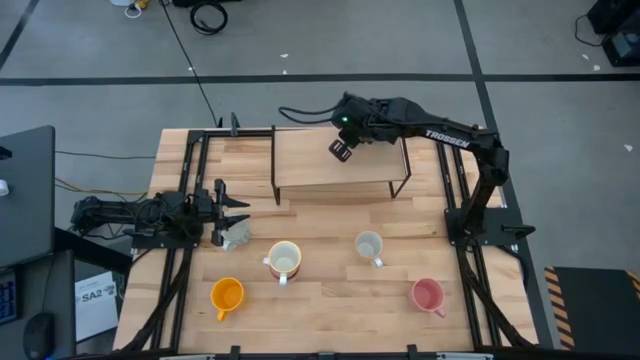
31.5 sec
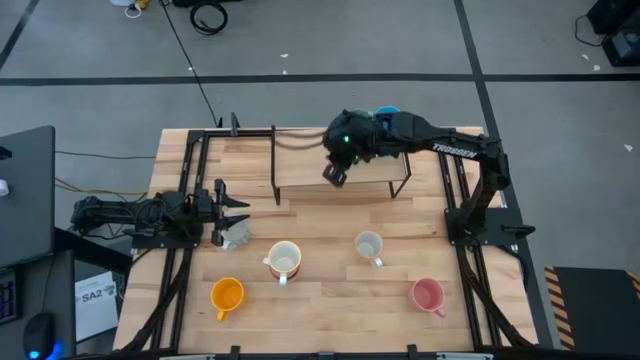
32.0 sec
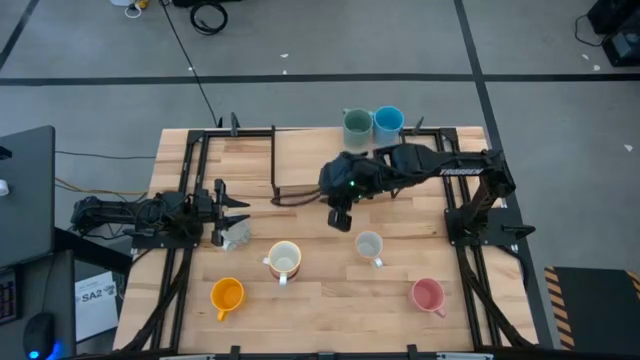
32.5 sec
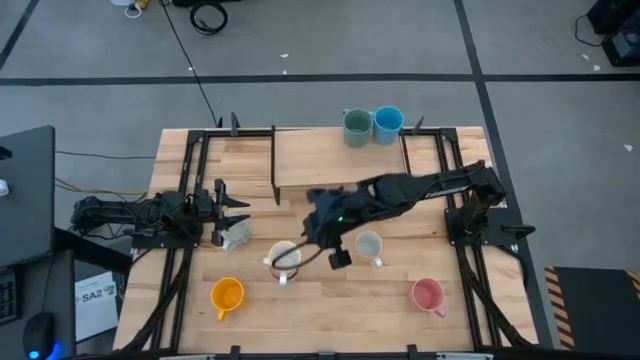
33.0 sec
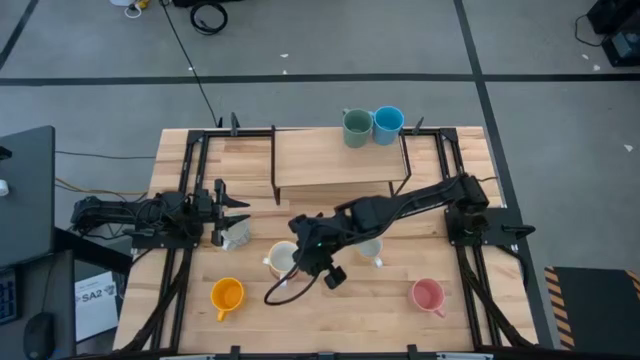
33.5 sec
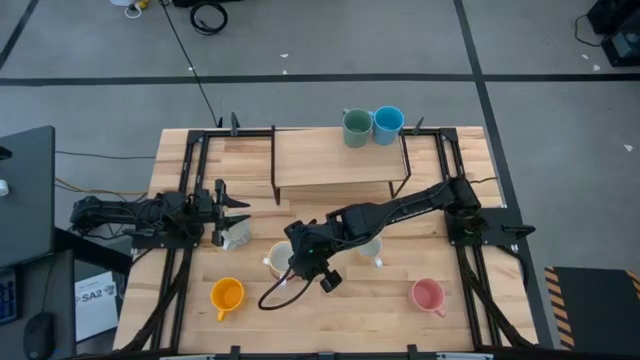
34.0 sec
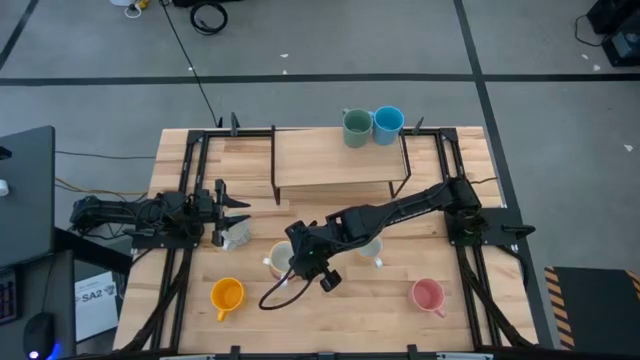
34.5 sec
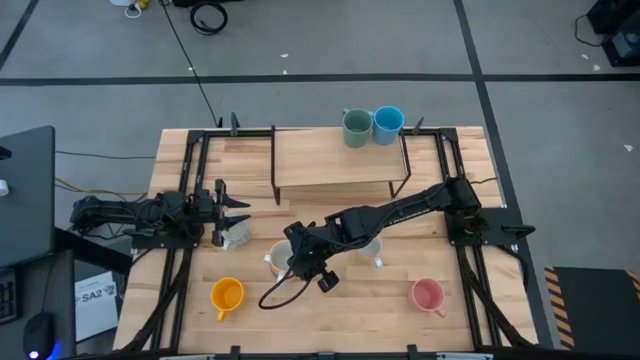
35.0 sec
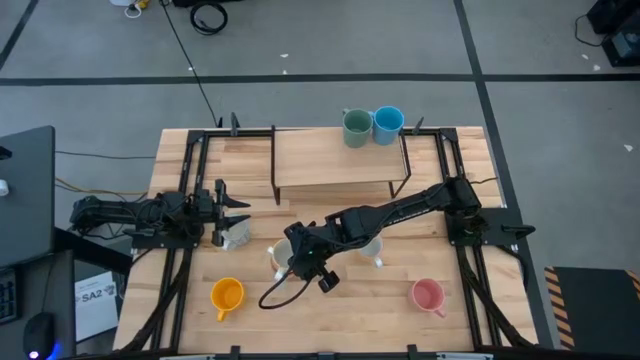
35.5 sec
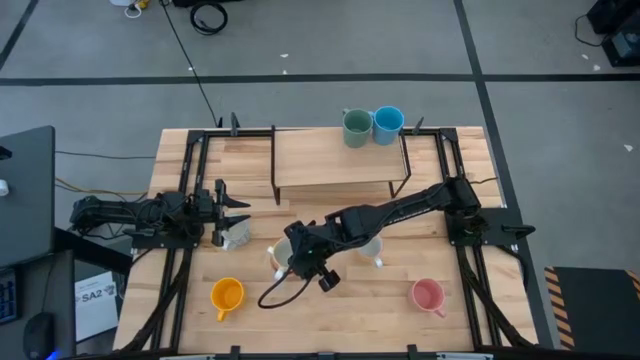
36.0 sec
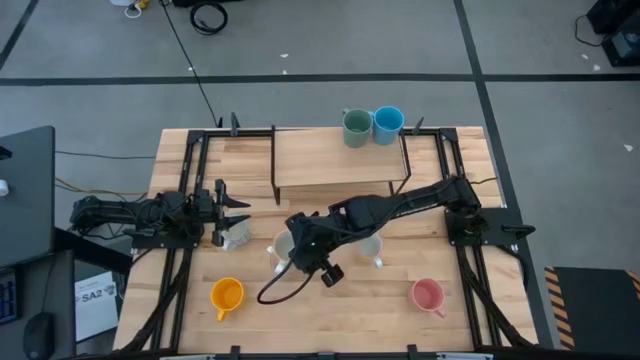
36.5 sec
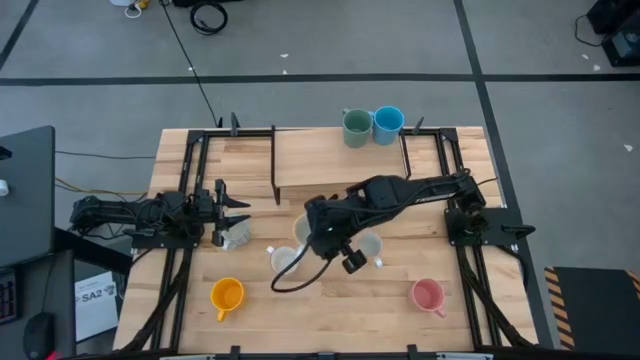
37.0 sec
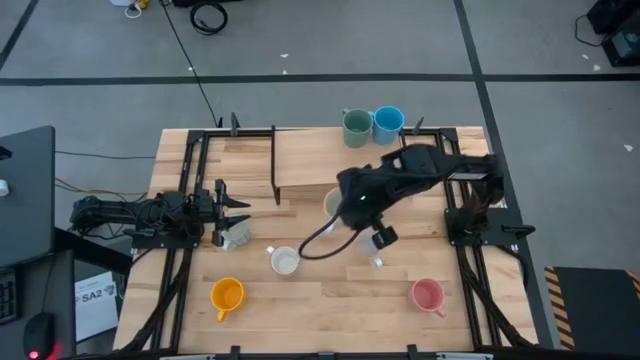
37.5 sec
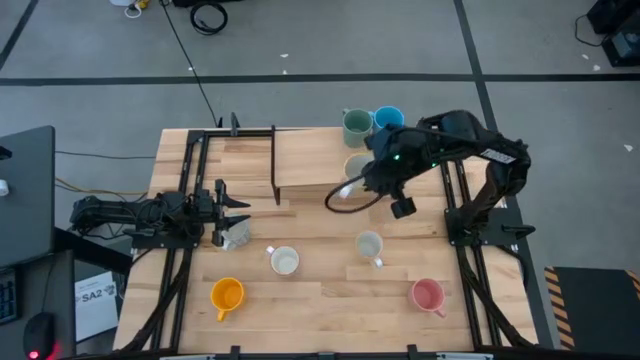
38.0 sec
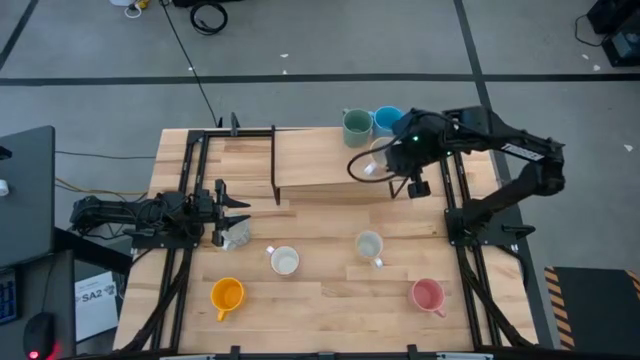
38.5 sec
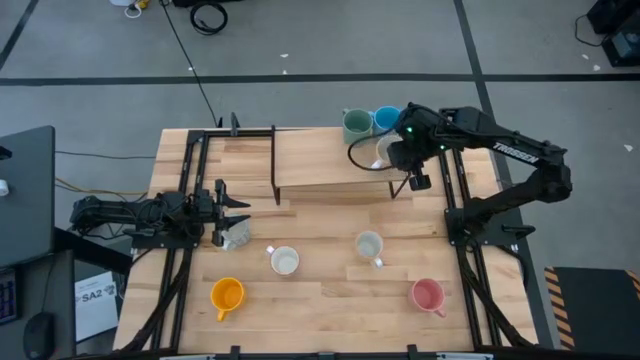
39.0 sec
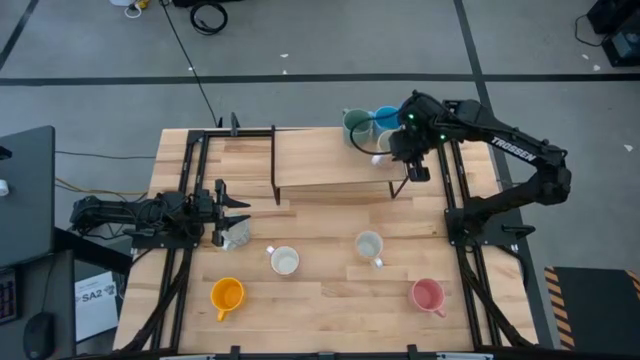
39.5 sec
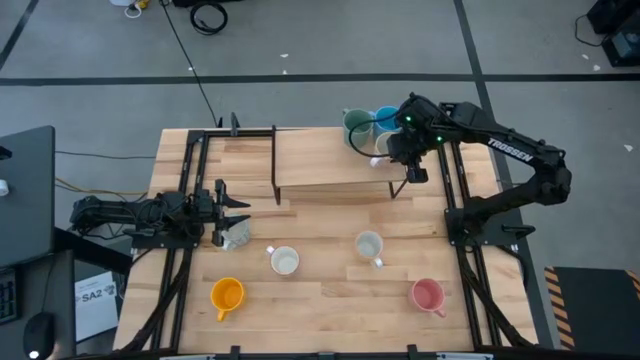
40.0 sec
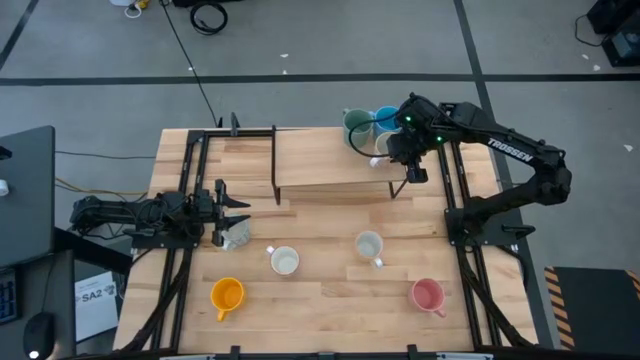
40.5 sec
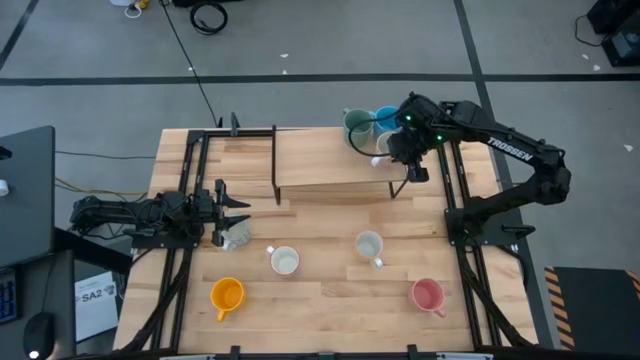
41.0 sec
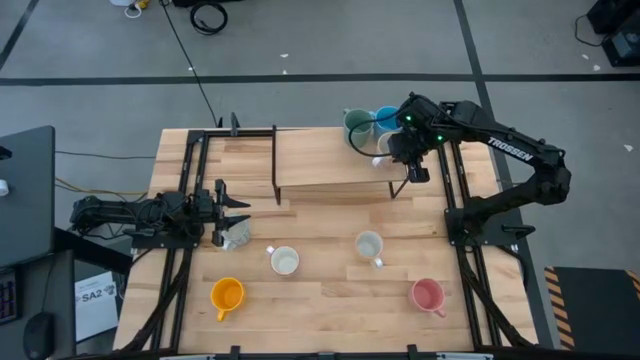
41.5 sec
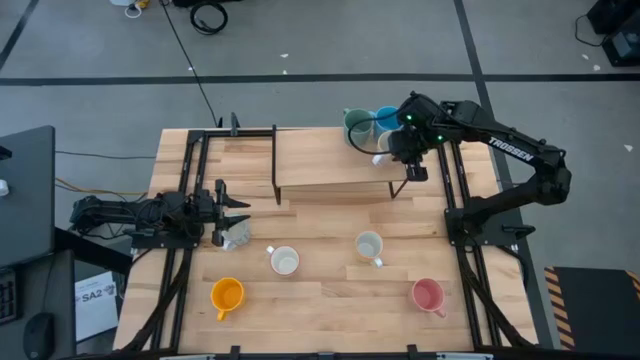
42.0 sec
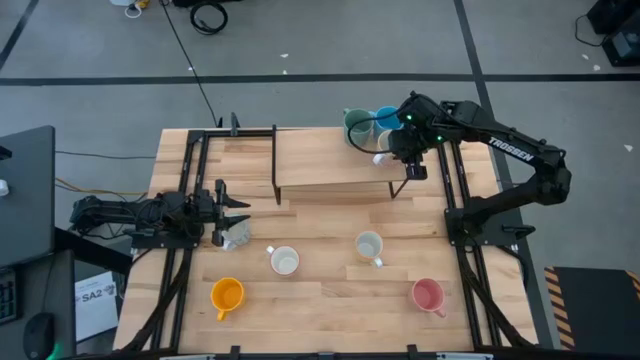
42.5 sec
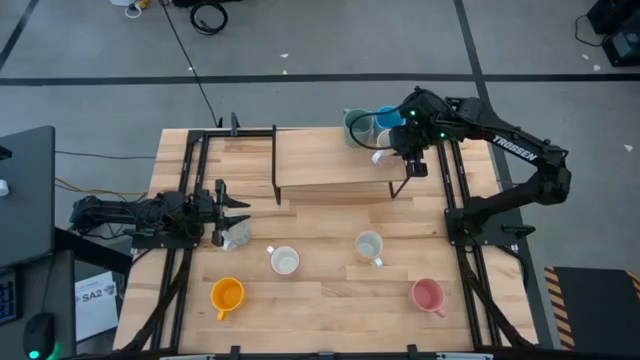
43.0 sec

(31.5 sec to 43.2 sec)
Task: Place coffee mugs
Put the white-orange mug on the shelf

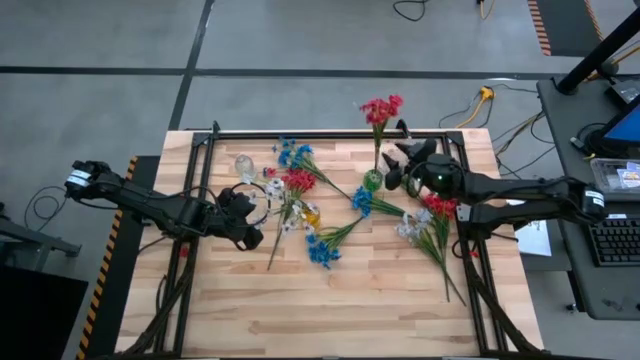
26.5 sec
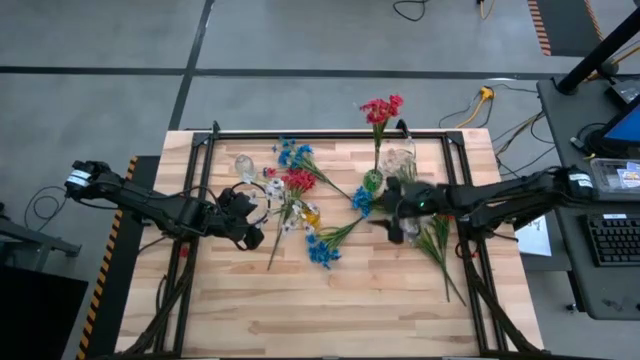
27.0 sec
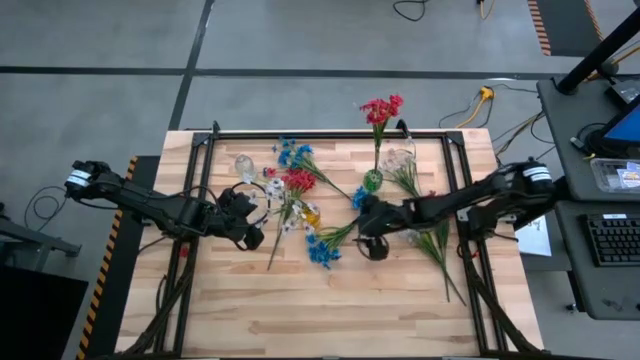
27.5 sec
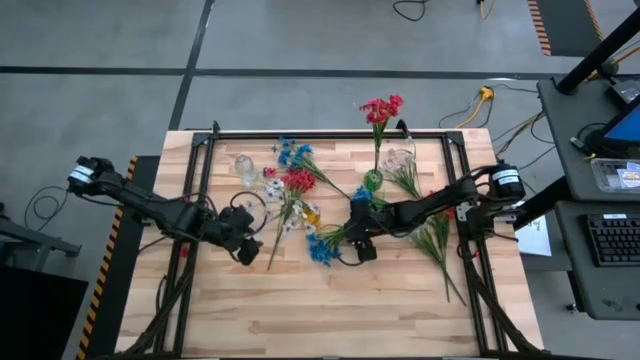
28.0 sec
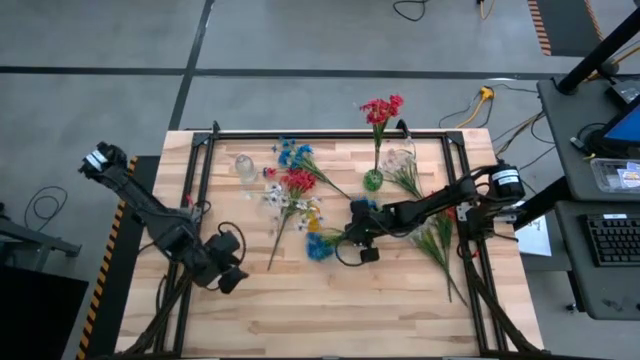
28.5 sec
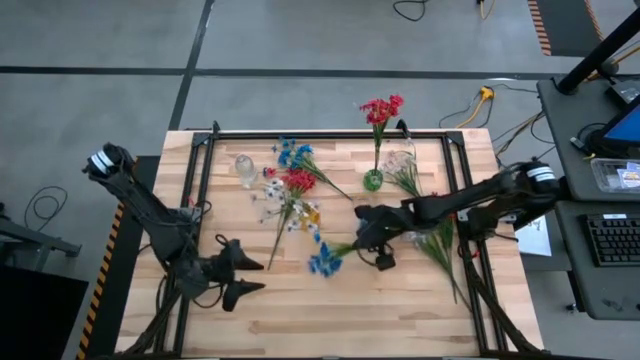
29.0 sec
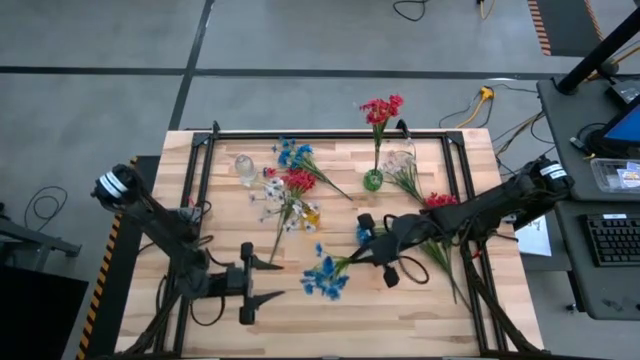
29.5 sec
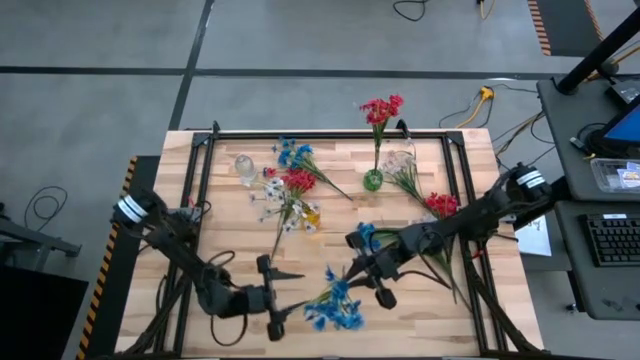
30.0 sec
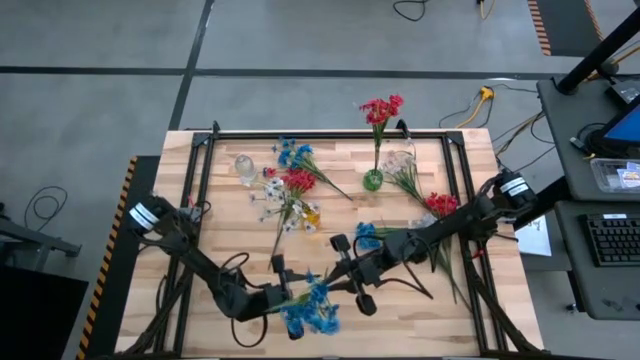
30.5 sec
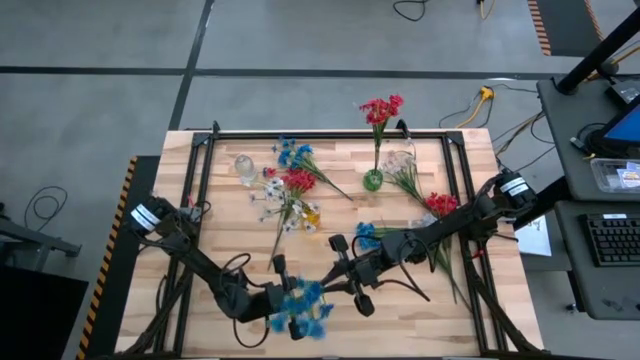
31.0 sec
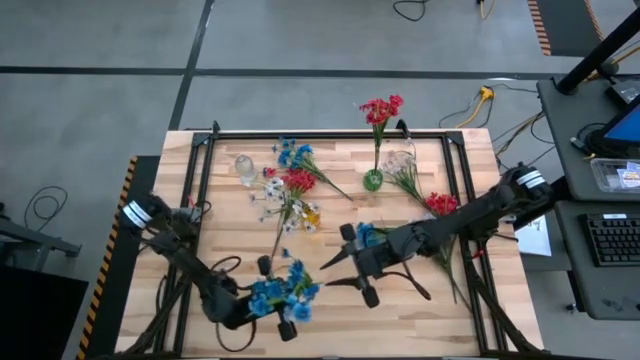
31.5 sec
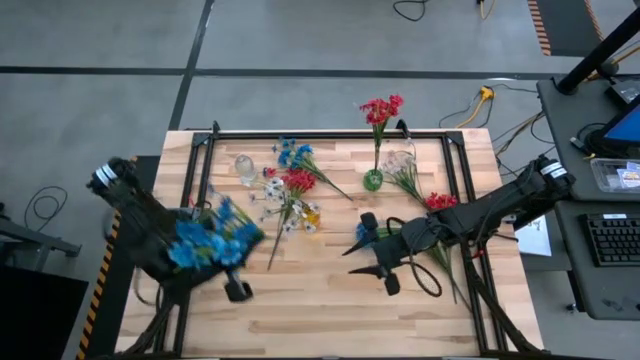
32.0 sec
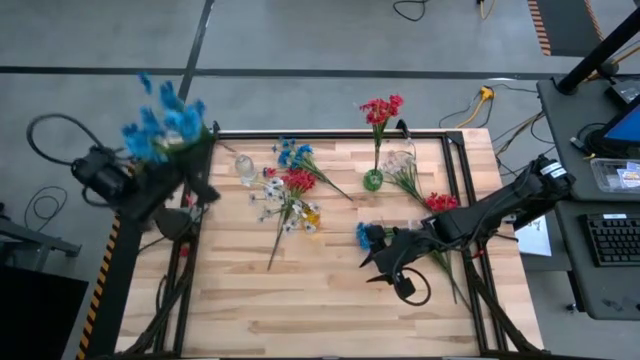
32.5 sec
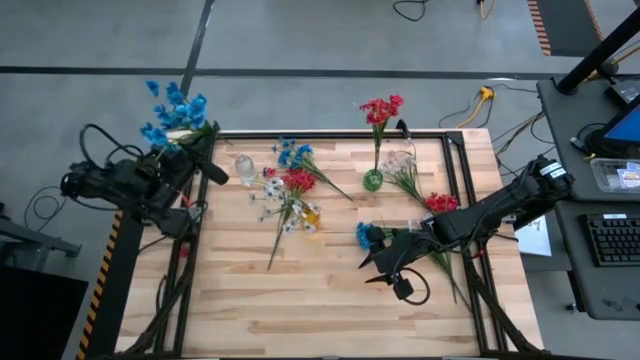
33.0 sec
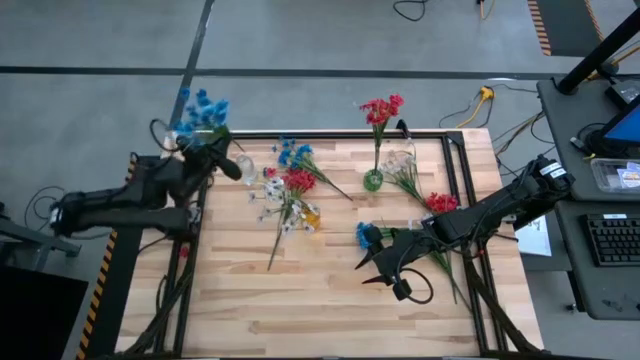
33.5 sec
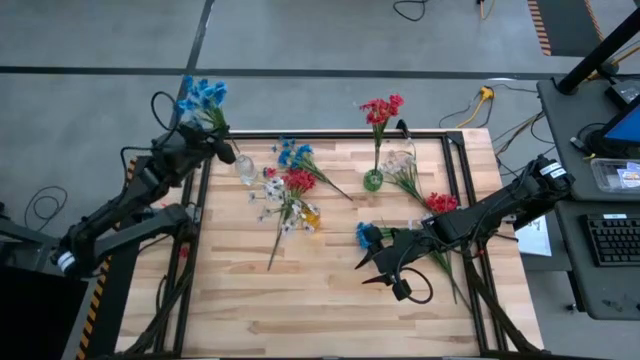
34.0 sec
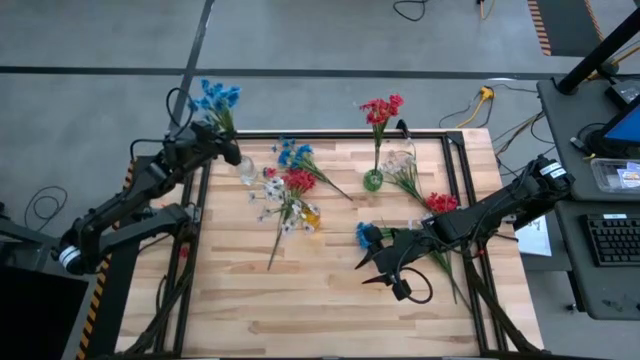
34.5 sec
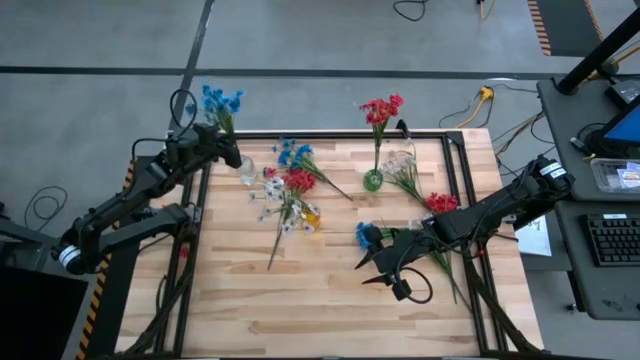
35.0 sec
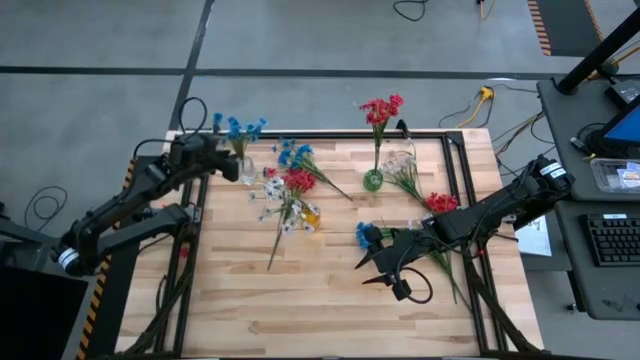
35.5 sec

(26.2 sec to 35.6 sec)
Task: Sort flowers into vase by color
Put the bottom blue flowers into the transparent vase
